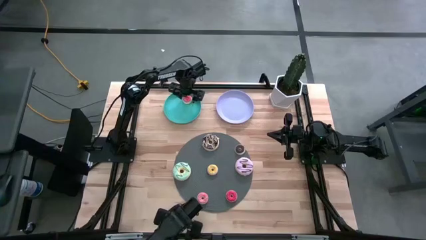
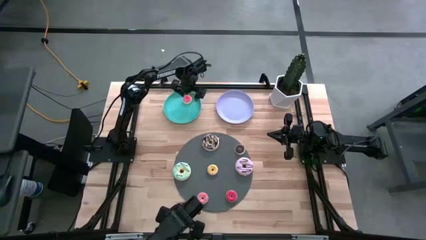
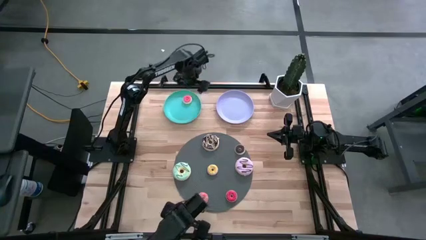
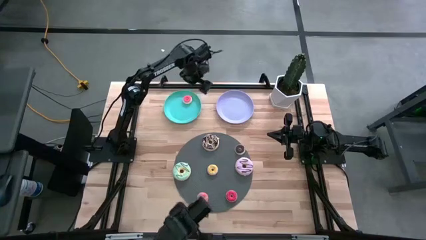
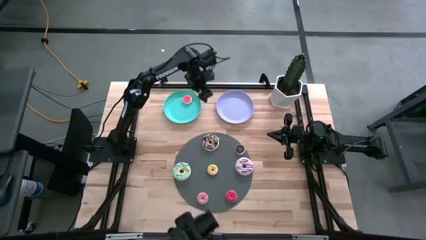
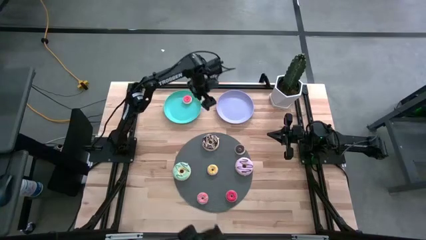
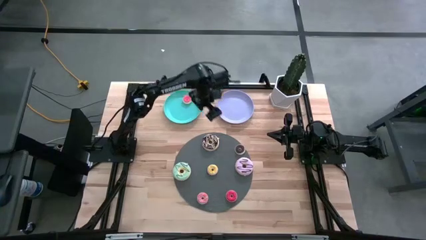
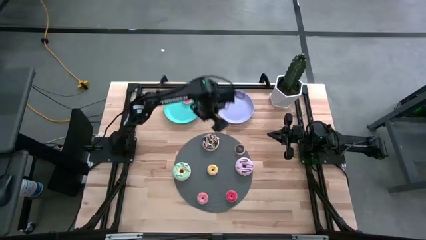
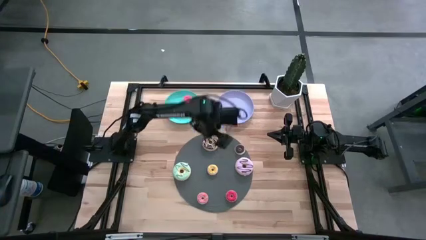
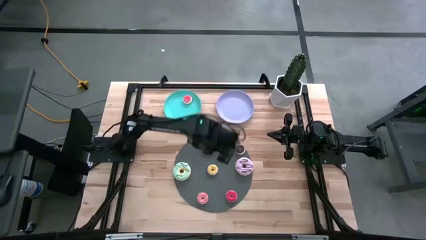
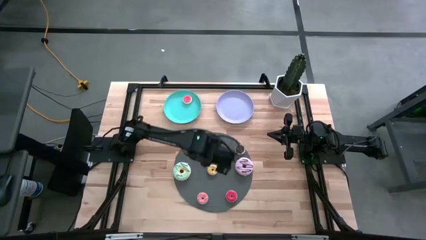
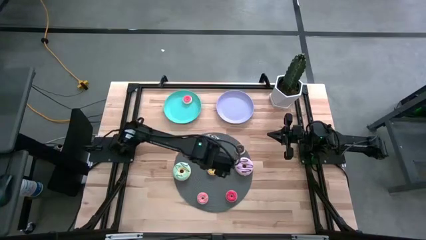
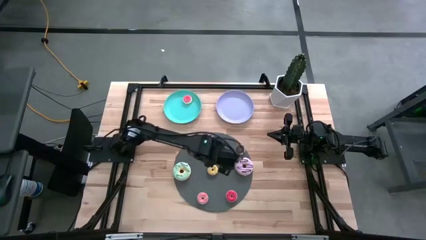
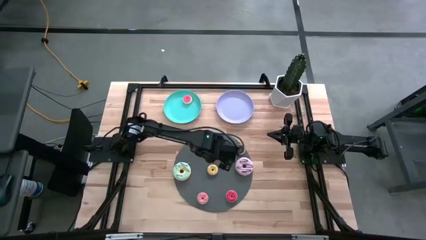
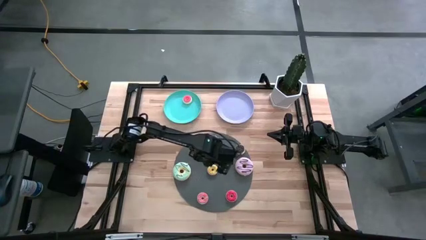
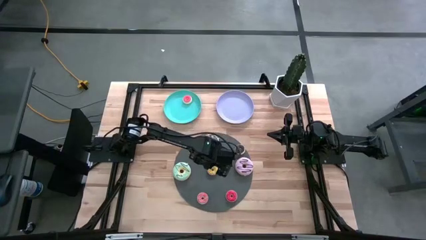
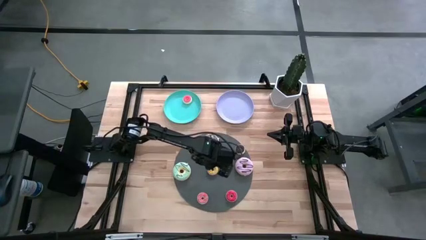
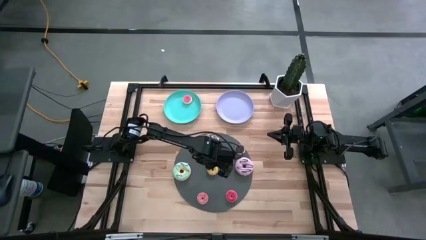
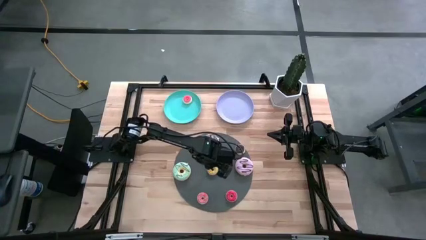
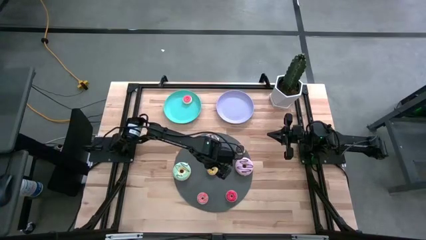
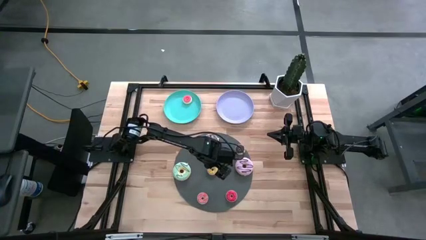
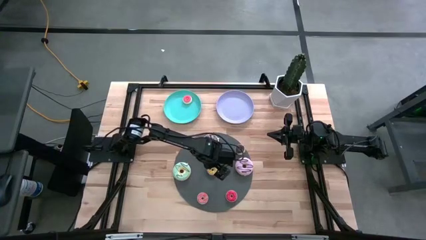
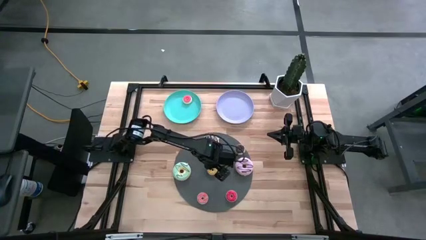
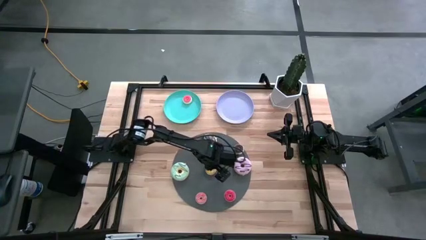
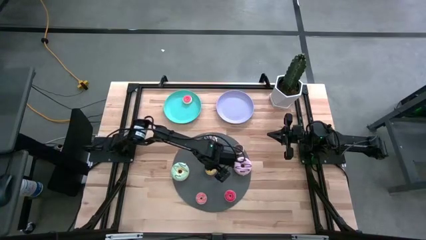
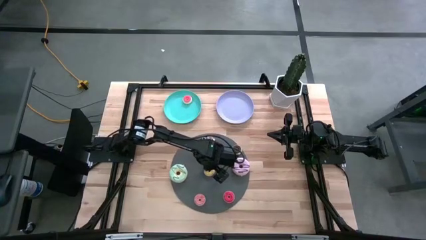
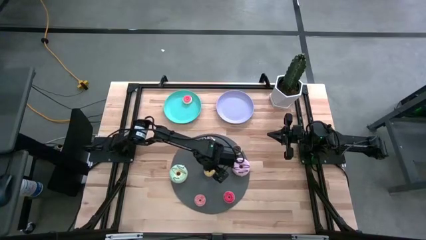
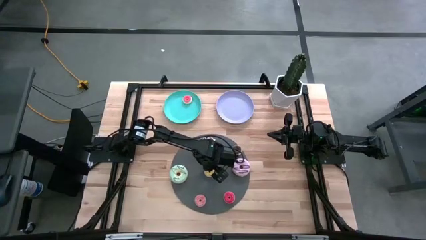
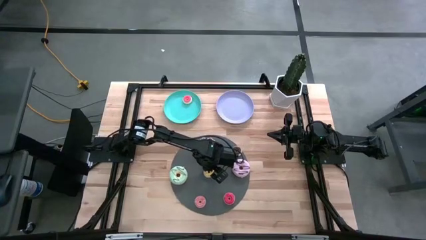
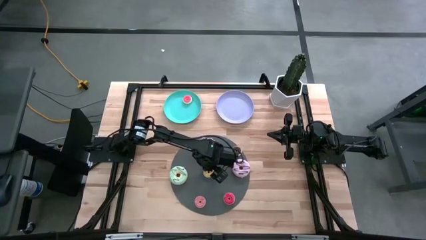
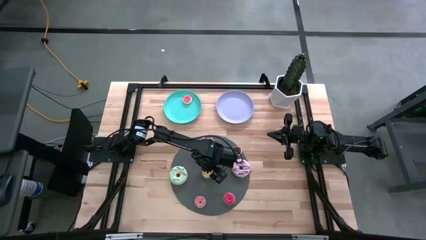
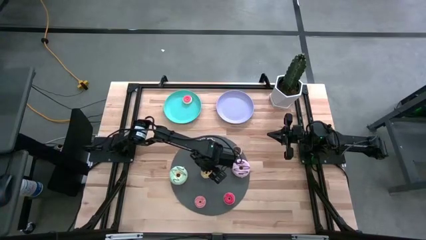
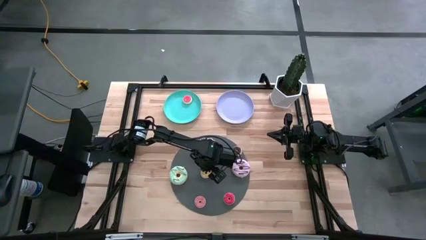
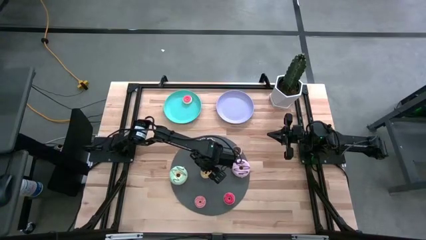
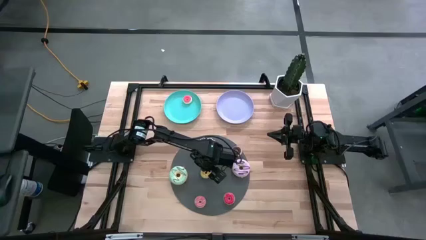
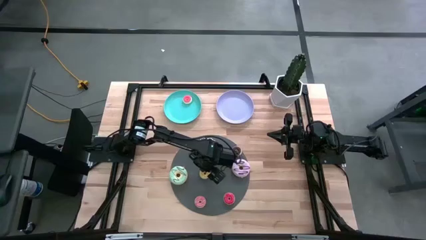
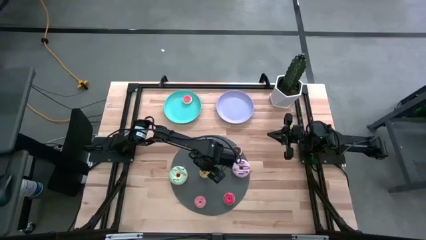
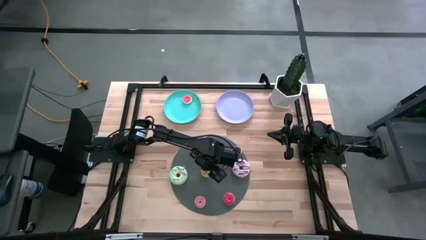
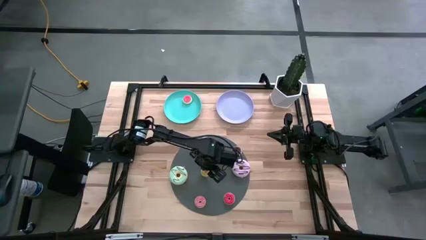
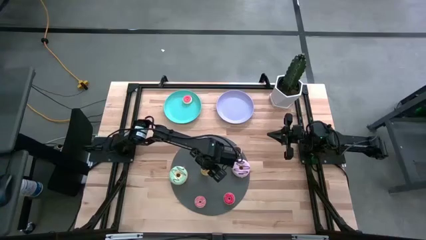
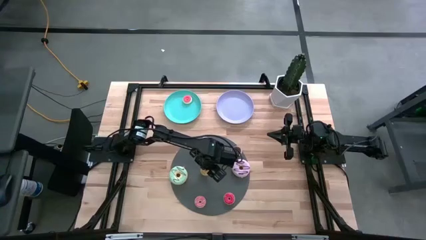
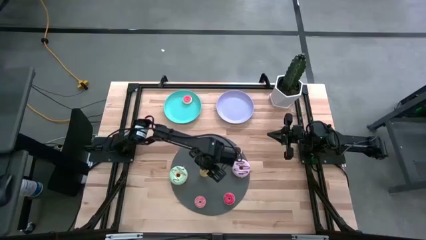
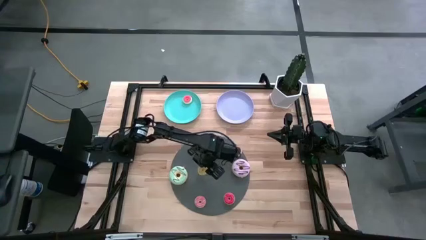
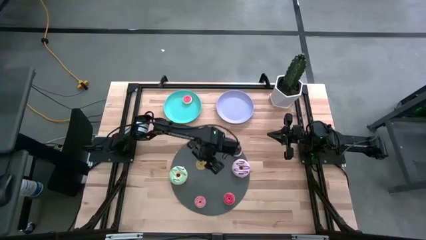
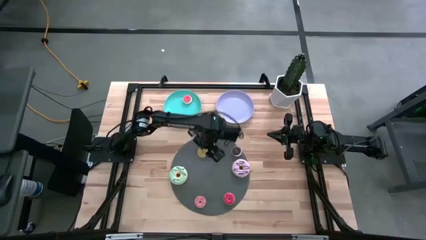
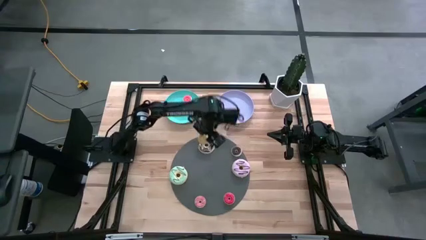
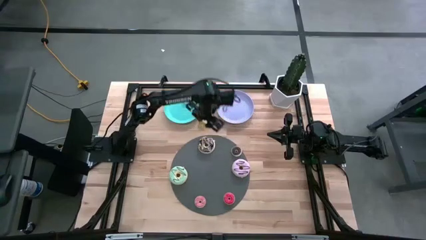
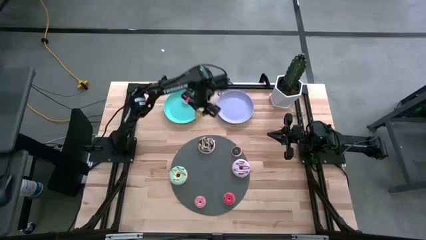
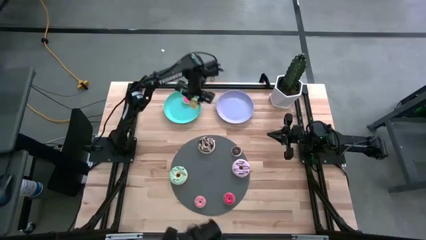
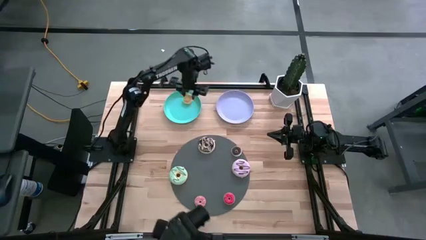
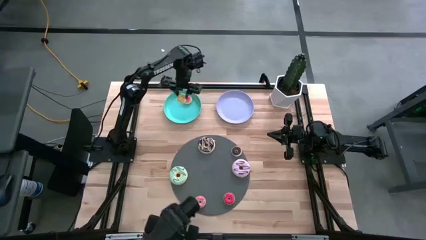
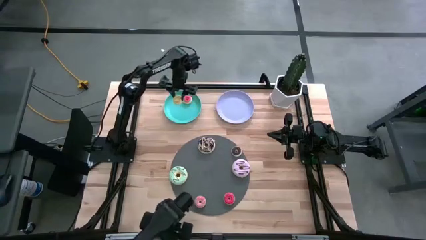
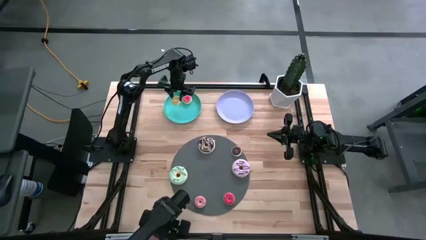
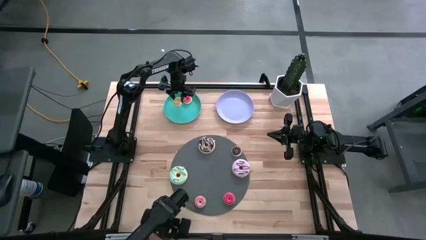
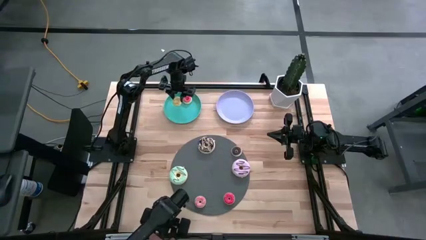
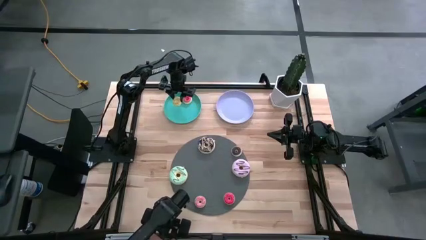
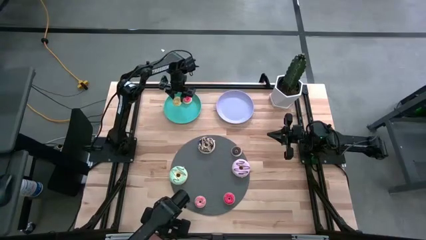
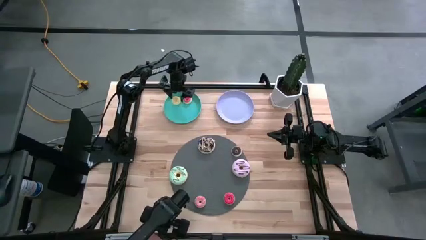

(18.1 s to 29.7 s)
Task: Pick & Place donuts
Put the small yellow donut on the green plate

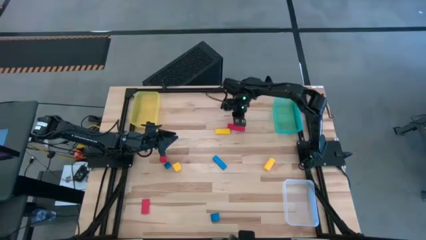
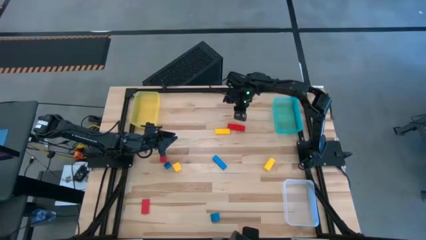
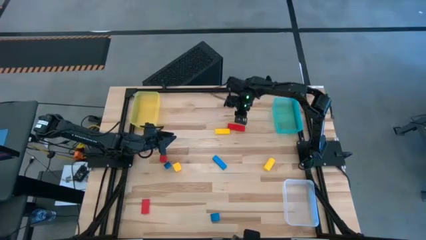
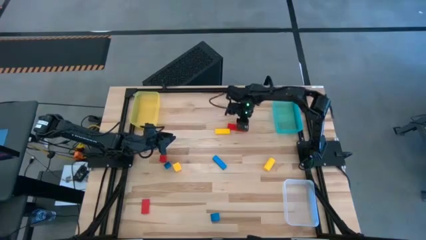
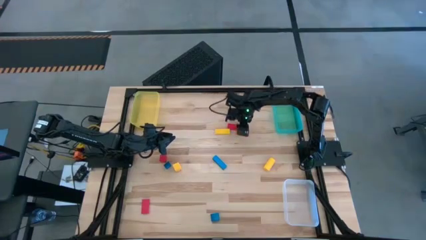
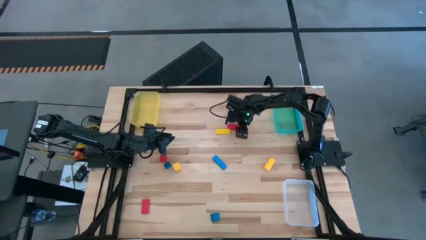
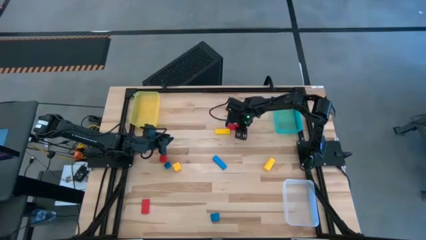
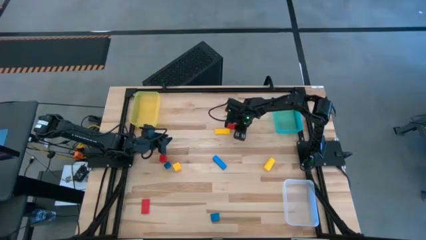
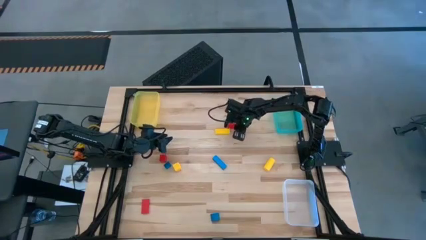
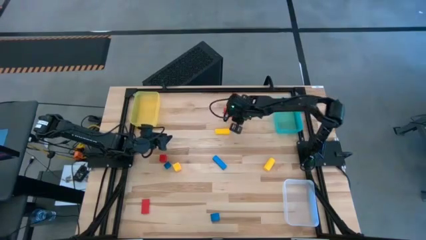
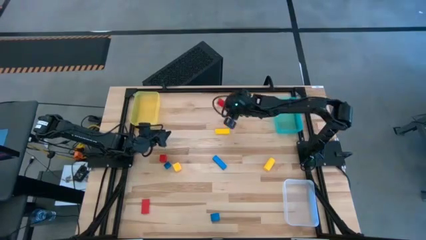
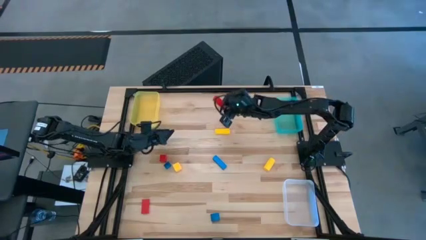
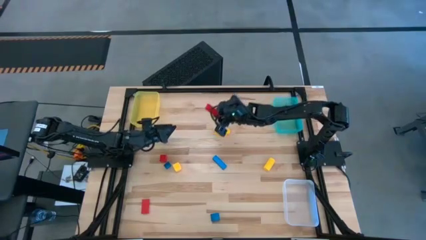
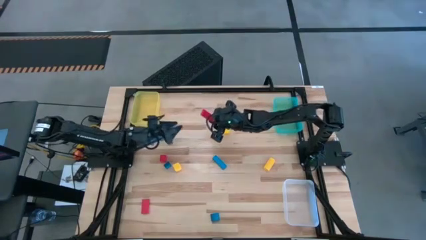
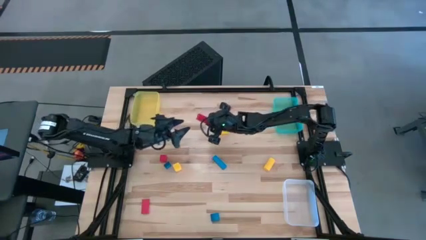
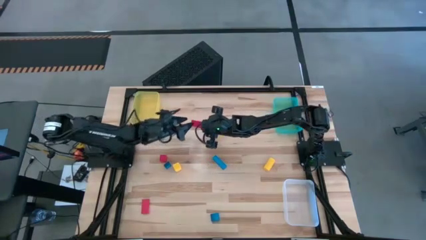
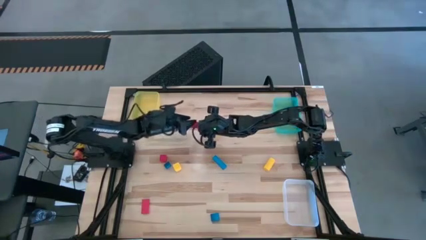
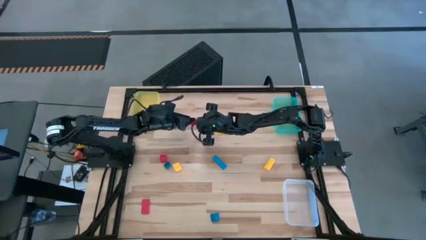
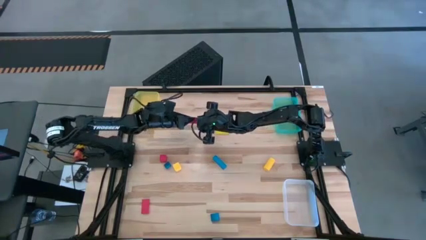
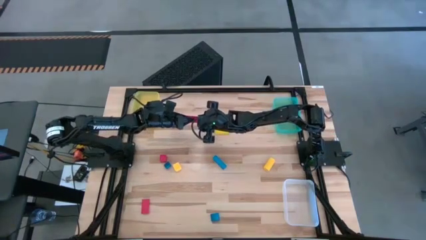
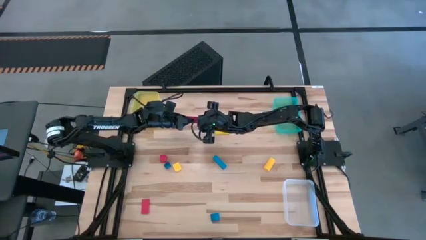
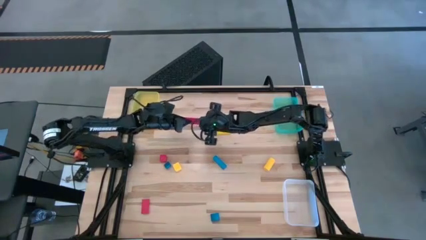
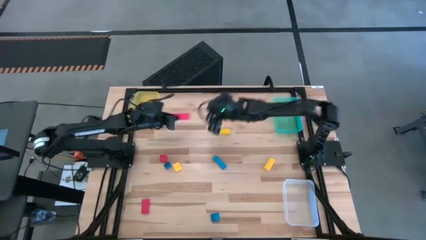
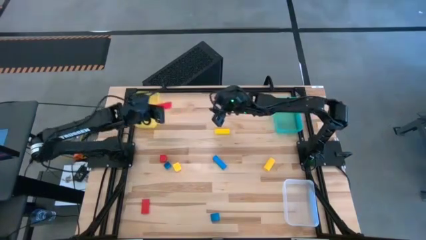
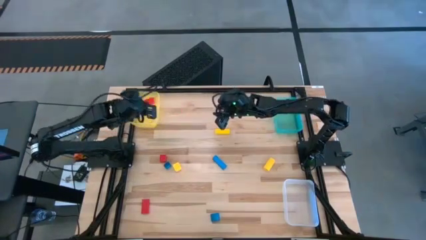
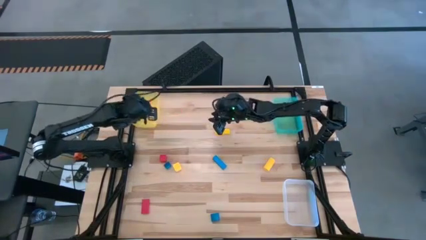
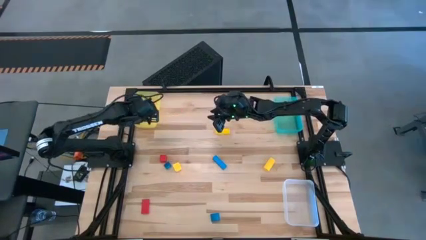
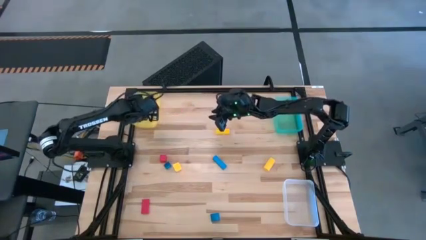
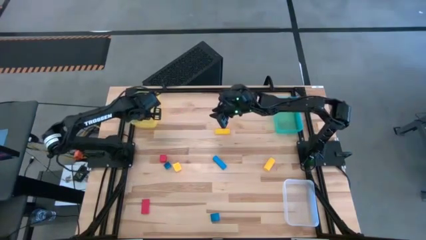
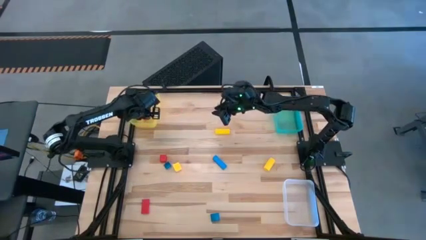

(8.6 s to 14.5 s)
Task: Sort & place blocks by color
Put the top red block into the yellow bin
